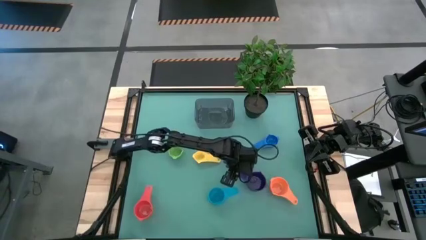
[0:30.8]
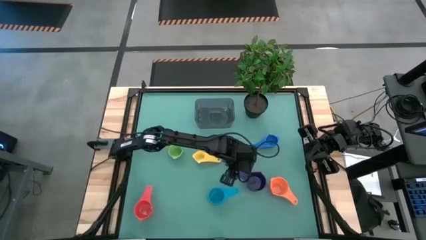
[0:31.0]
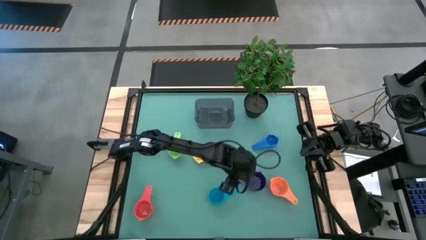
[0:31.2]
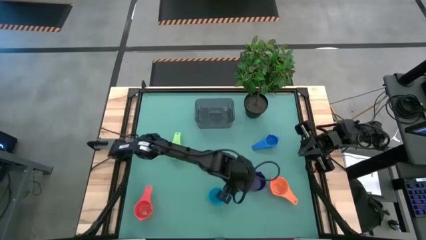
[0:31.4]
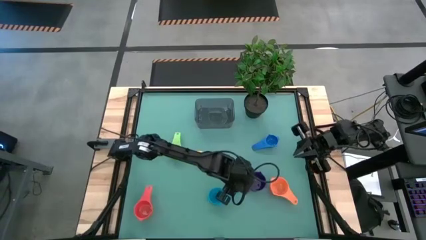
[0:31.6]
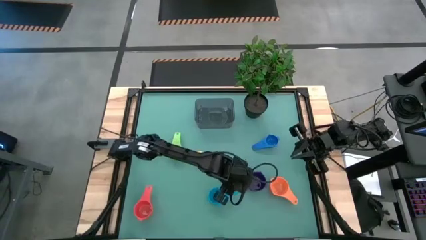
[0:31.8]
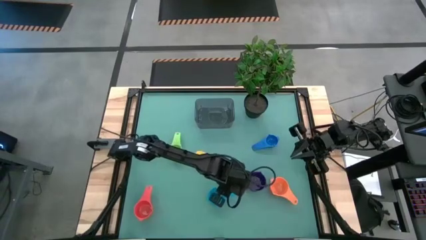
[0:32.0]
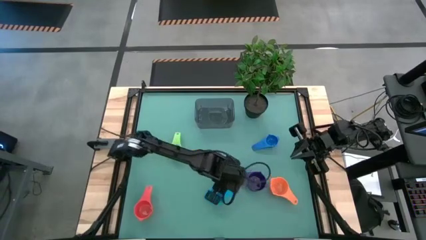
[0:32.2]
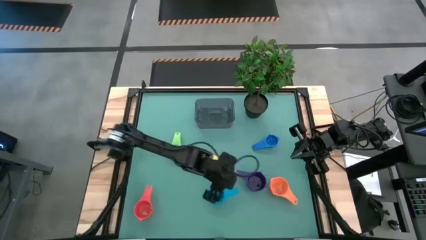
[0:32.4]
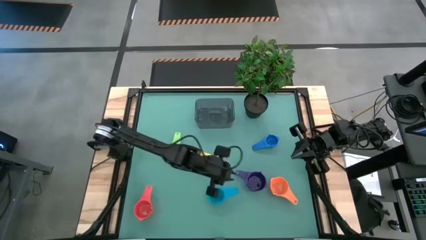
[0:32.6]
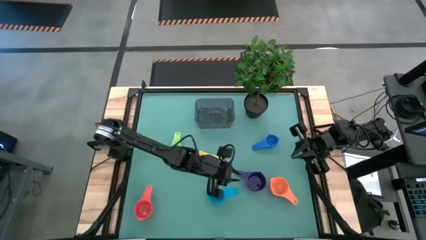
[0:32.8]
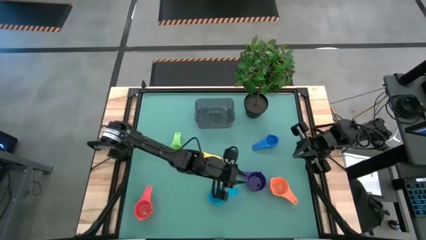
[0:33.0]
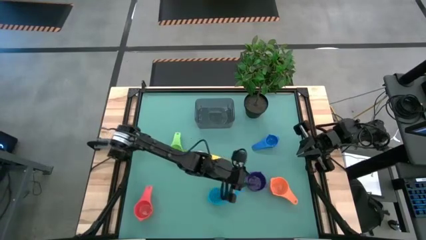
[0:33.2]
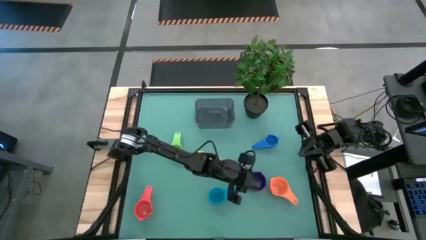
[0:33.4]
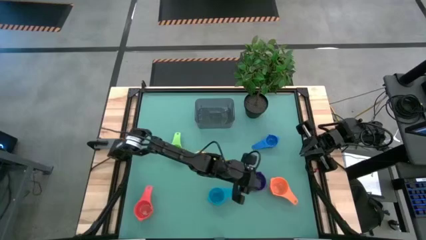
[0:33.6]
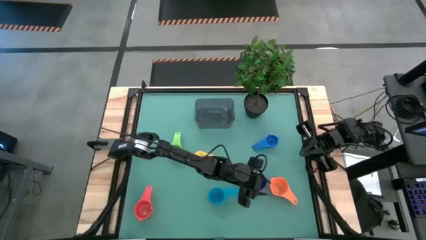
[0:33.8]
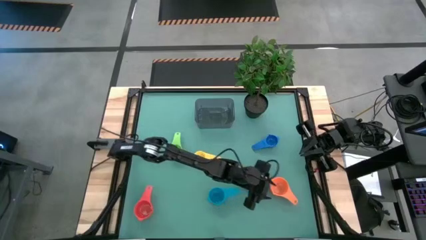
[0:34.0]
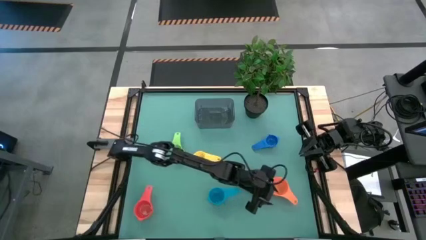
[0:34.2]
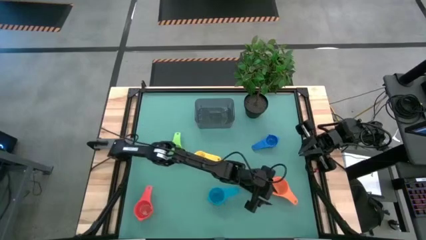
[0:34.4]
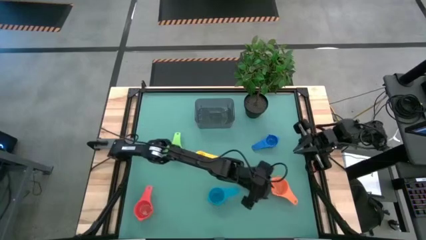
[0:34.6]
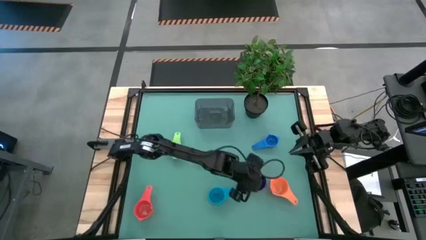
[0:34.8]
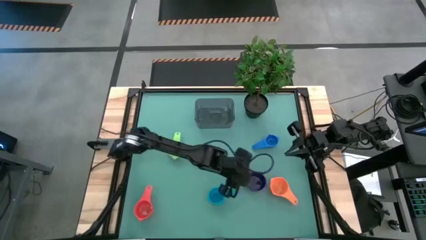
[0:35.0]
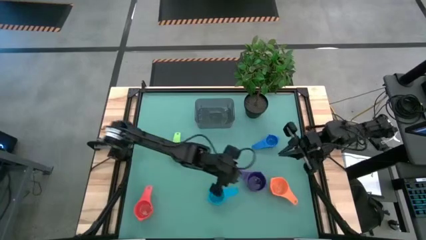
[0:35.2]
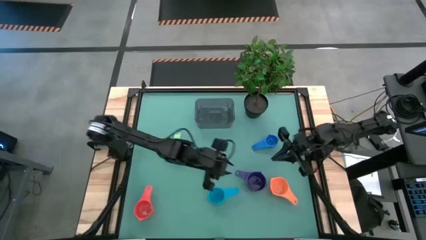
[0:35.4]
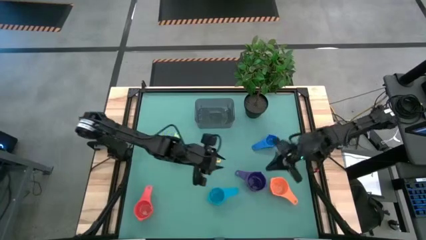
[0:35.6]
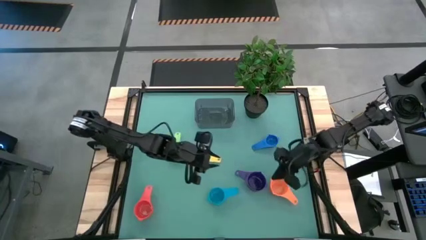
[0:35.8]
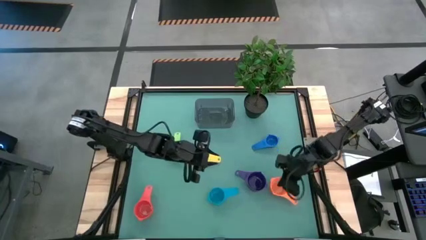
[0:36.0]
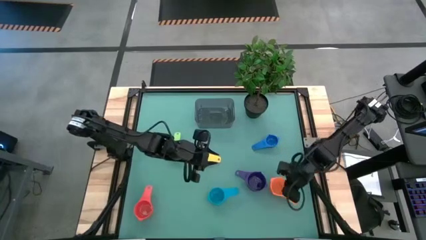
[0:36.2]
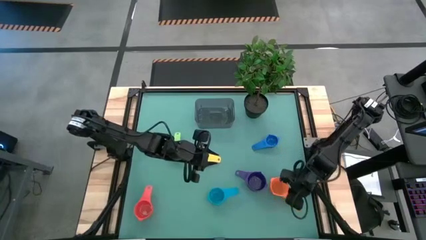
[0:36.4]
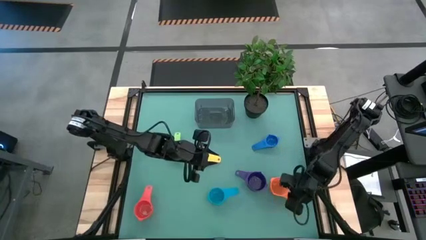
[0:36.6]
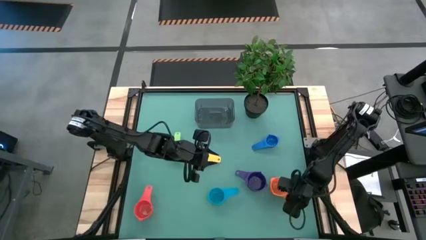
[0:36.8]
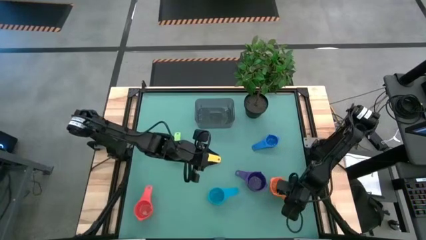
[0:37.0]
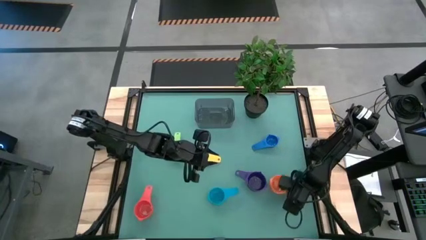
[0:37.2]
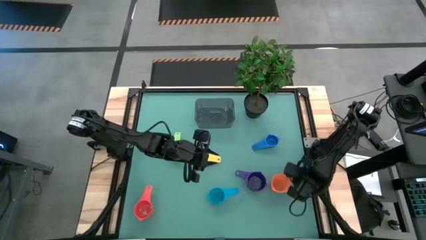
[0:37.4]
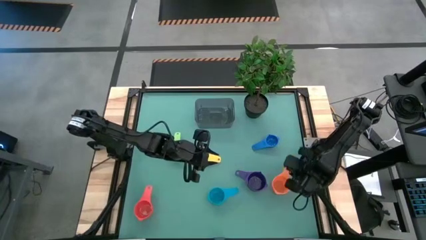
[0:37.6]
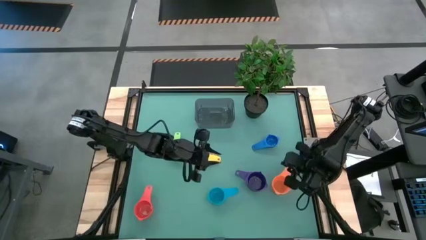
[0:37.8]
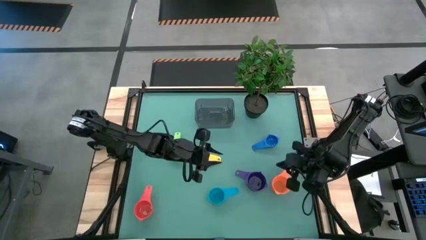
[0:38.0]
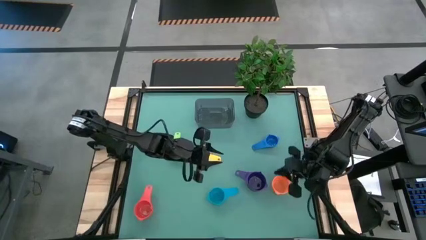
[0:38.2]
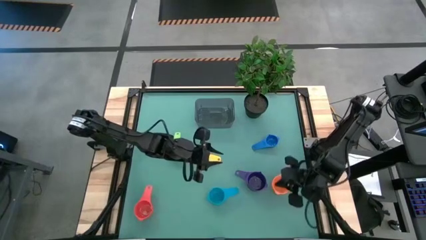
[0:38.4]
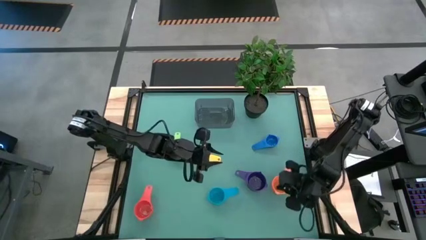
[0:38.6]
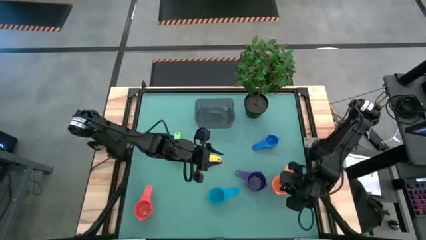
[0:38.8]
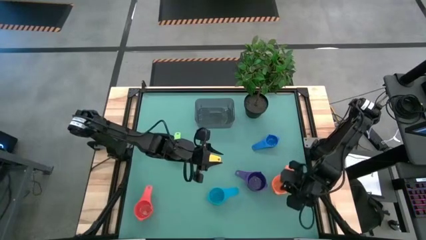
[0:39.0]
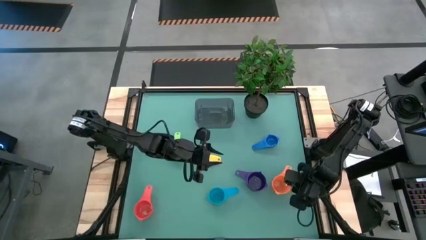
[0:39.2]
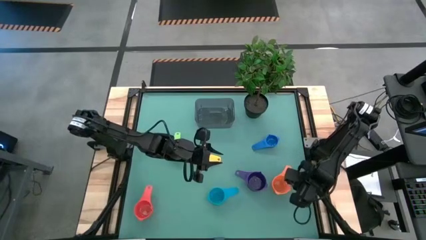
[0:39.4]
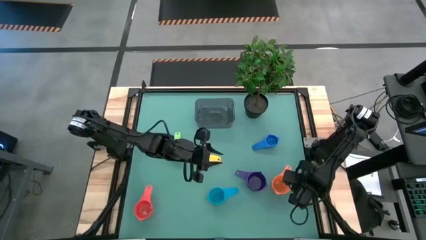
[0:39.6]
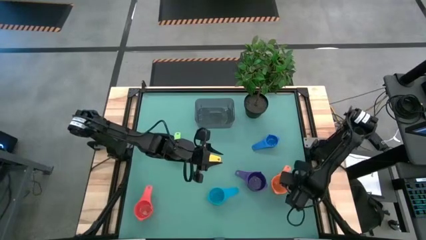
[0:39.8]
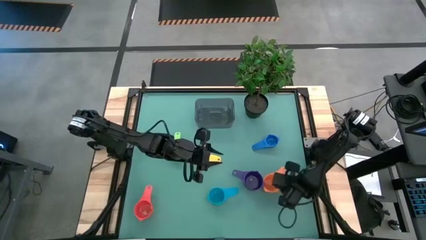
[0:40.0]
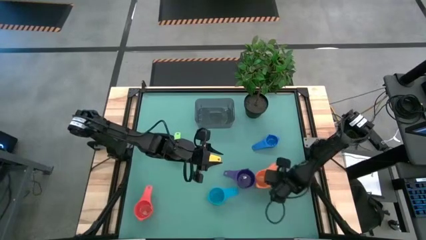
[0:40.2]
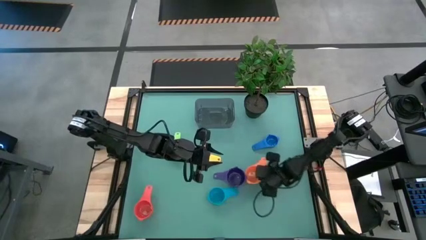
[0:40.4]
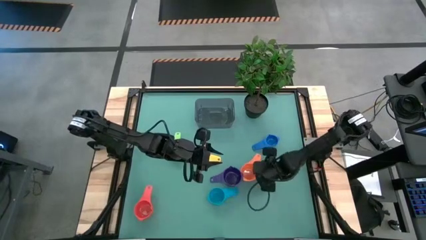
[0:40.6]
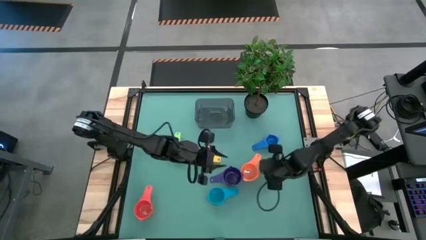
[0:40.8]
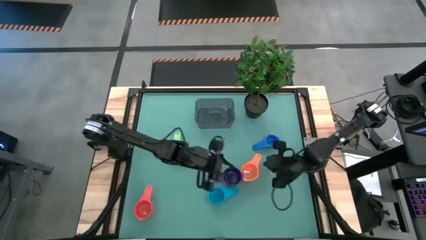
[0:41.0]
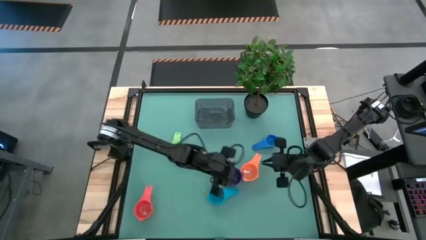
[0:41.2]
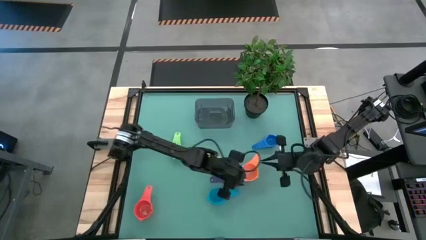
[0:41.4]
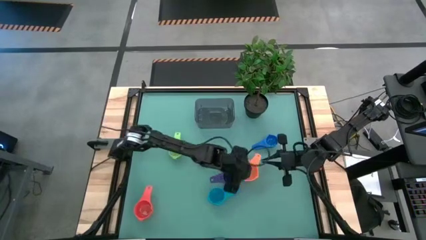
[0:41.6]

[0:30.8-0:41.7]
Task: Nest measuring cups in basket
Stack the orange measuring cup into the purple measuring cup

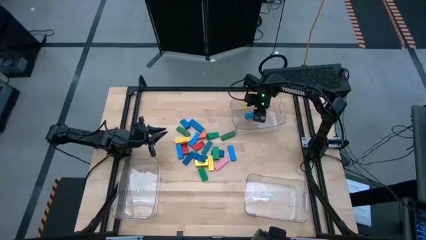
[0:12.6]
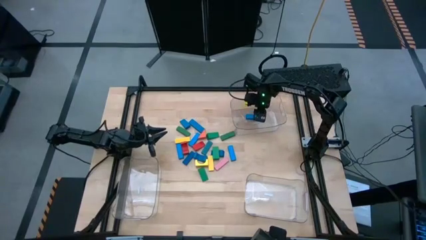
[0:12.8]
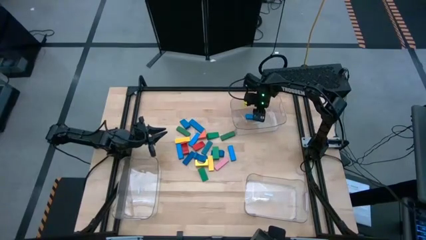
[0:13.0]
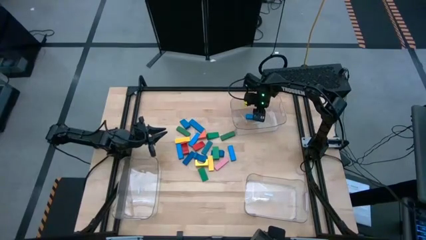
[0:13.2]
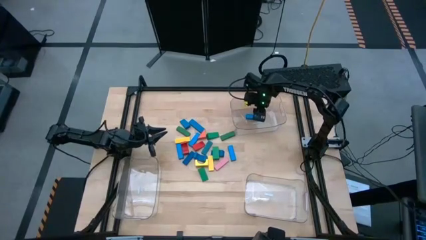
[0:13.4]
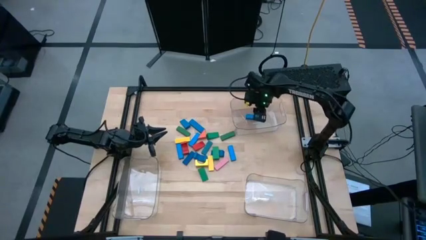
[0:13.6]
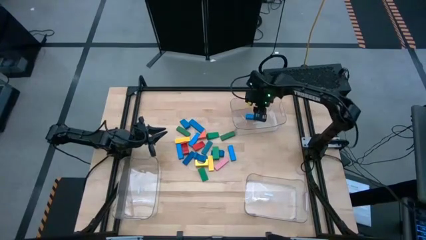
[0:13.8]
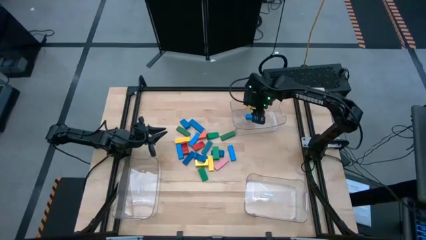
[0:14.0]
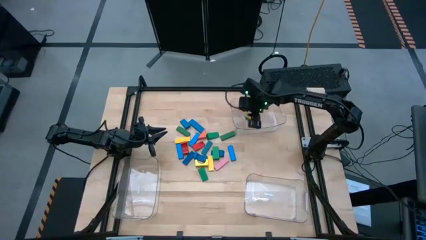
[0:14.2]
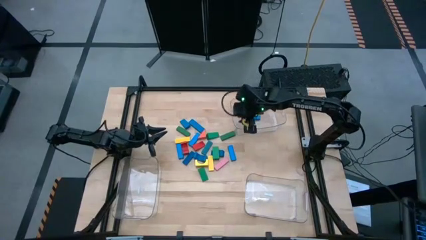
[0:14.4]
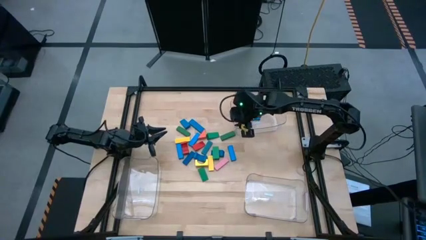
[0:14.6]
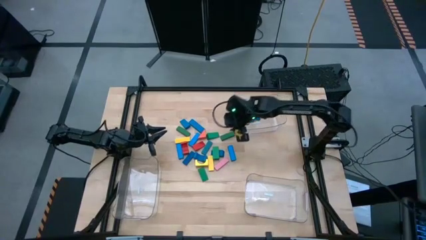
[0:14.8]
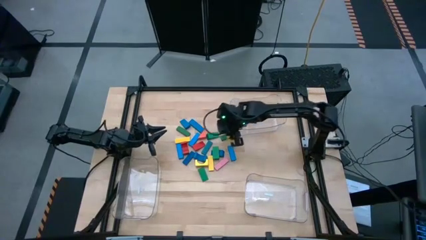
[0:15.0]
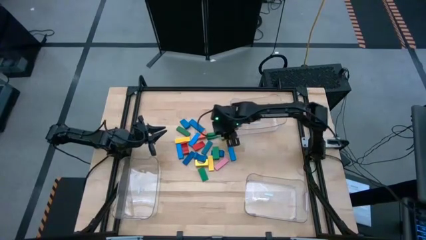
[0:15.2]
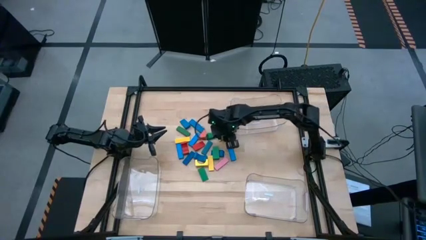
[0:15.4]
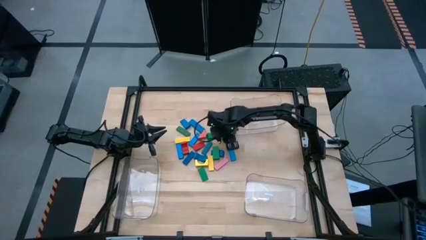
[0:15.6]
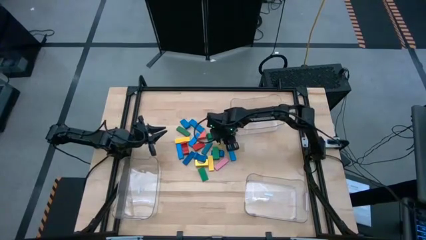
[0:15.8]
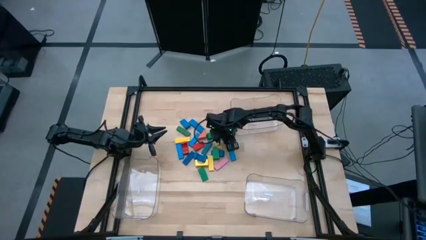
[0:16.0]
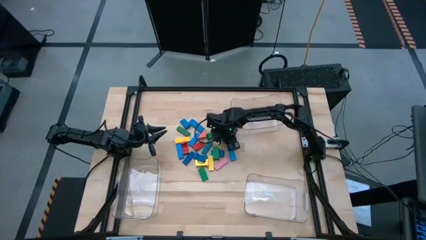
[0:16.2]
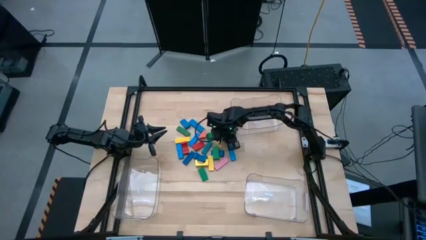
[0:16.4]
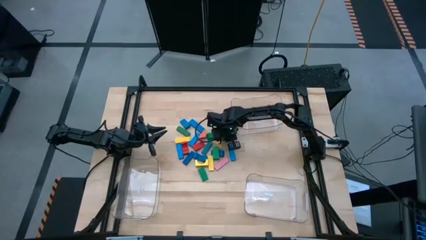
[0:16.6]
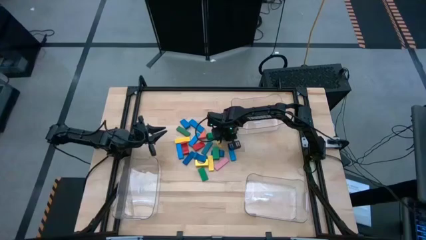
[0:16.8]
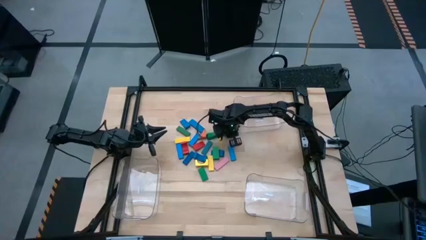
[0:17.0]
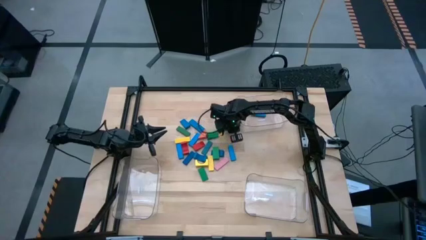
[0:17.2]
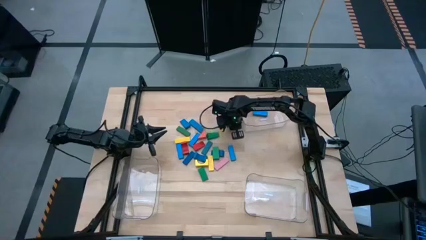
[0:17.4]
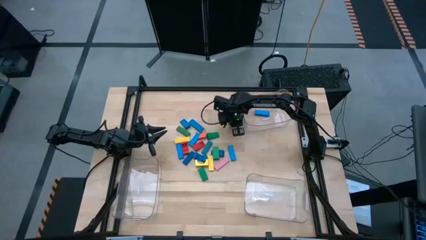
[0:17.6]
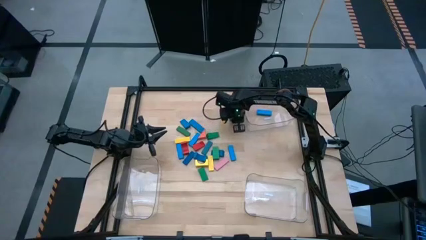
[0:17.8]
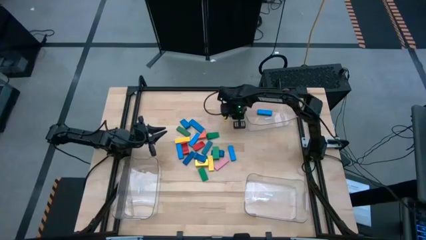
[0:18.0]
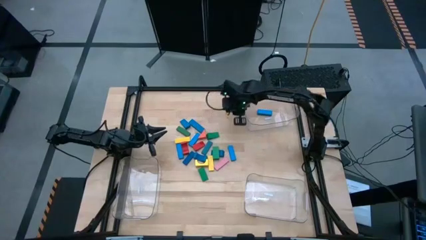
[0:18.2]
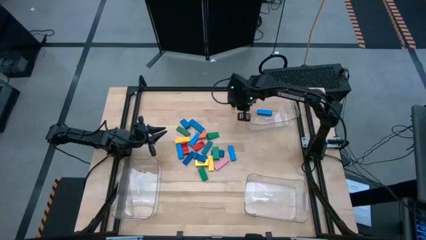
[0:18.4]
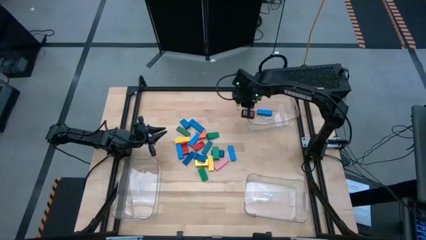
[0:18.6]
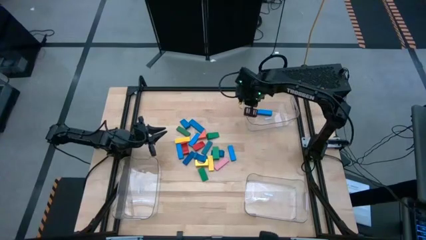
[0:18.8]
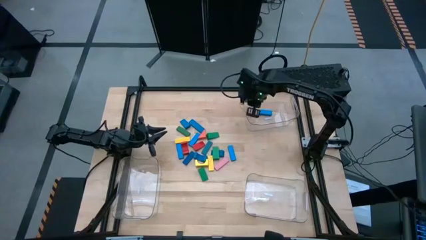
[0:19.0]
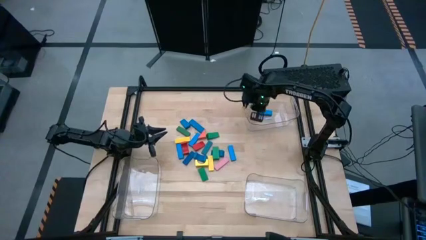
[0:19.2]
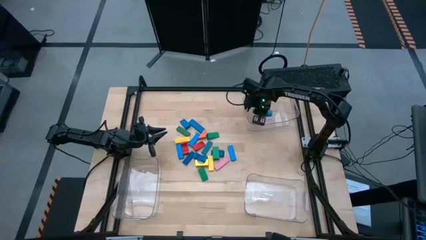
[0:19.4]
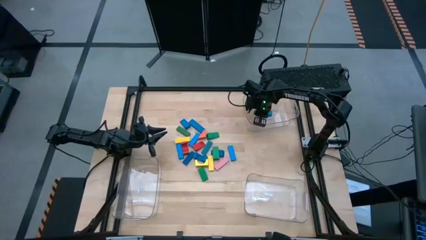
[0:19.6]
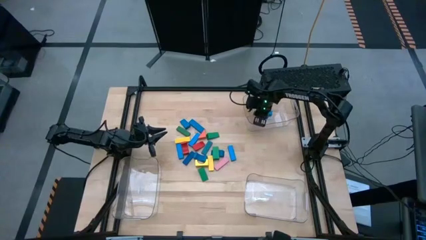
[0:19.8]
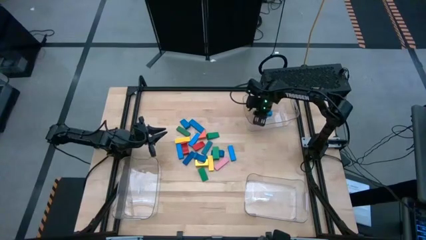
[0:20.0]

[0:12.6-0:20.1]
Task: Sort blocks by size
Put the green rectangle block into the top transparent bin
